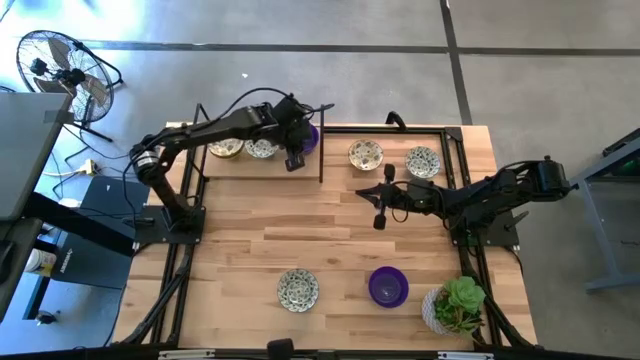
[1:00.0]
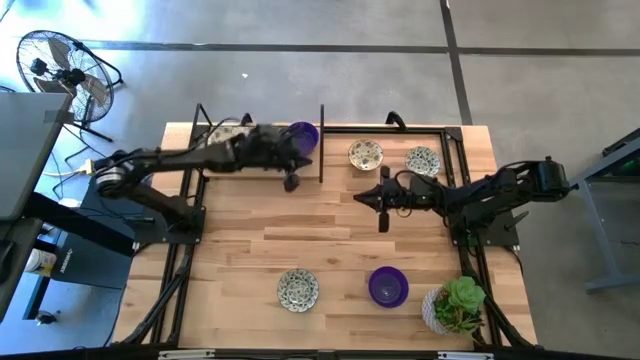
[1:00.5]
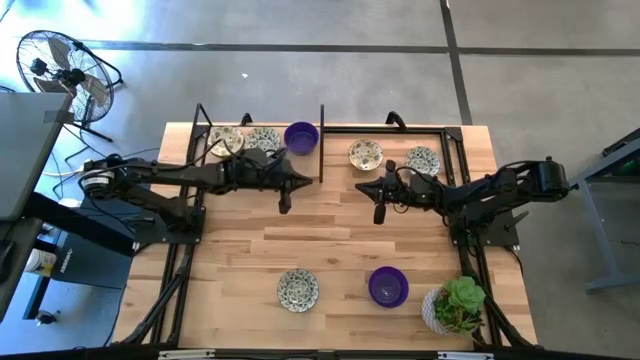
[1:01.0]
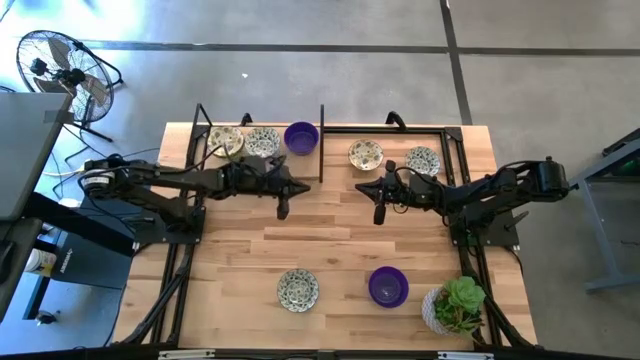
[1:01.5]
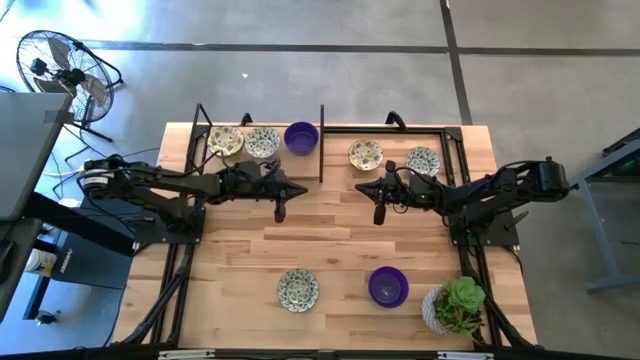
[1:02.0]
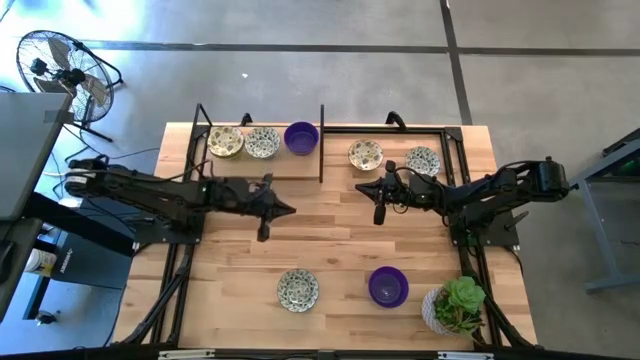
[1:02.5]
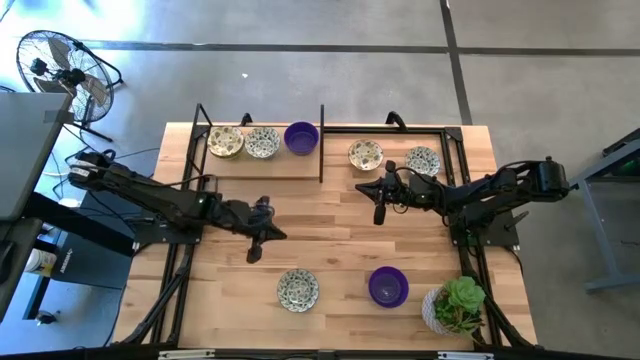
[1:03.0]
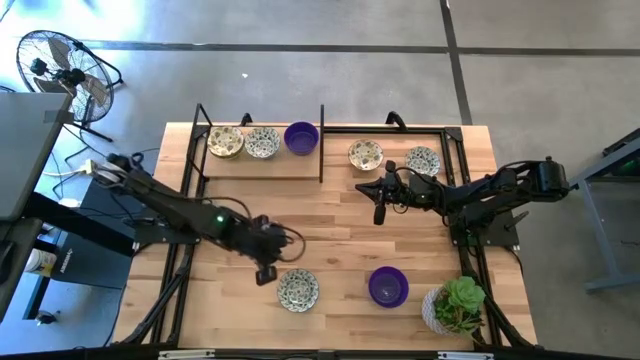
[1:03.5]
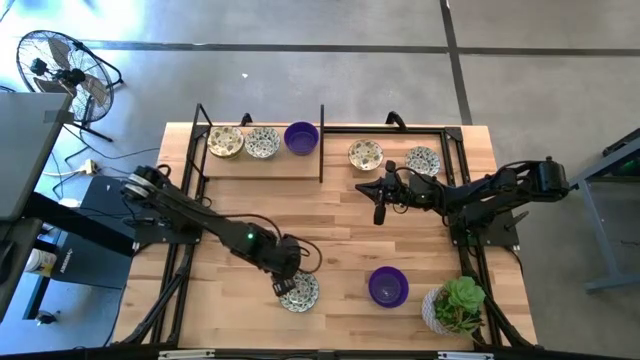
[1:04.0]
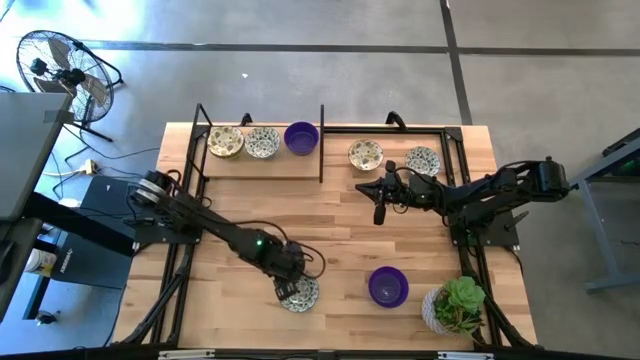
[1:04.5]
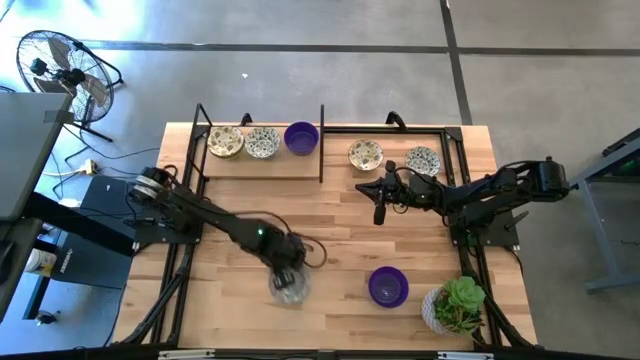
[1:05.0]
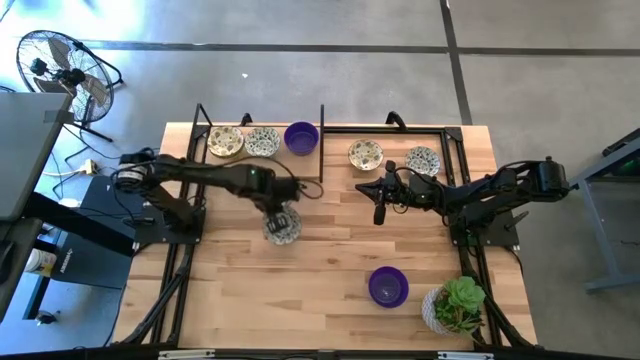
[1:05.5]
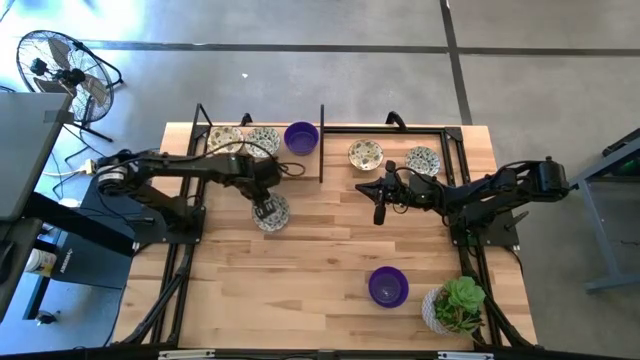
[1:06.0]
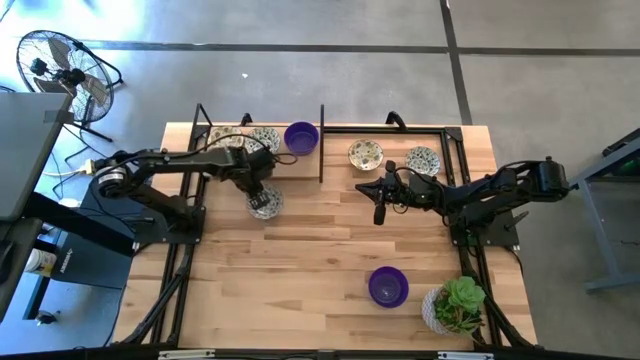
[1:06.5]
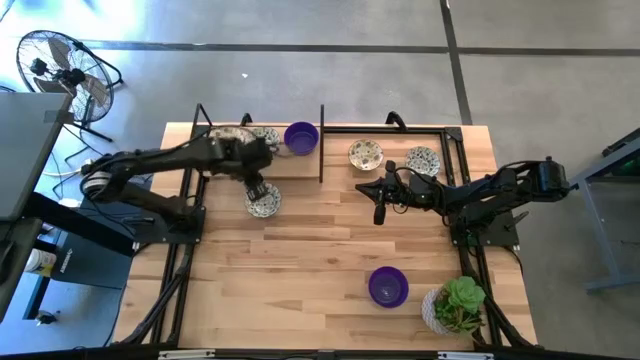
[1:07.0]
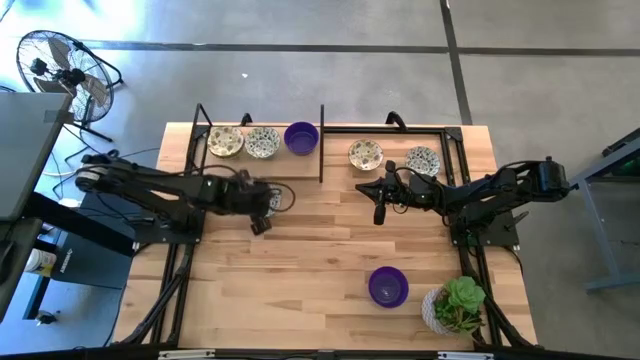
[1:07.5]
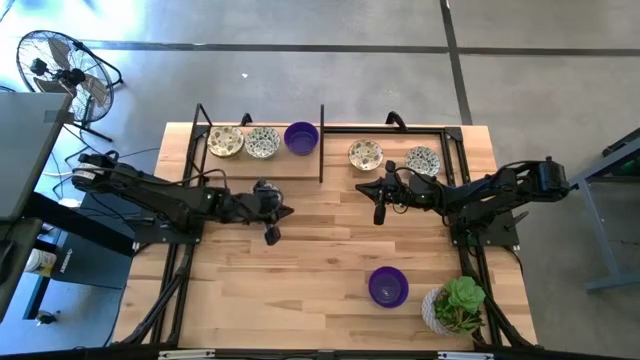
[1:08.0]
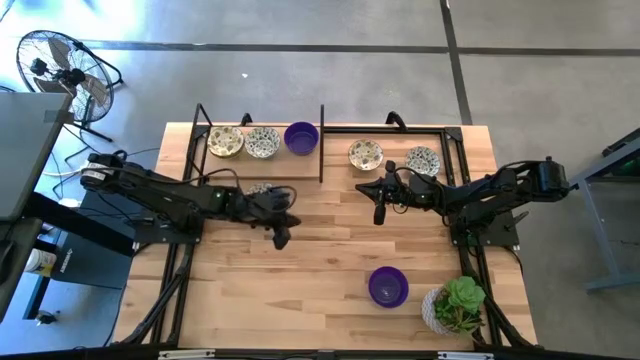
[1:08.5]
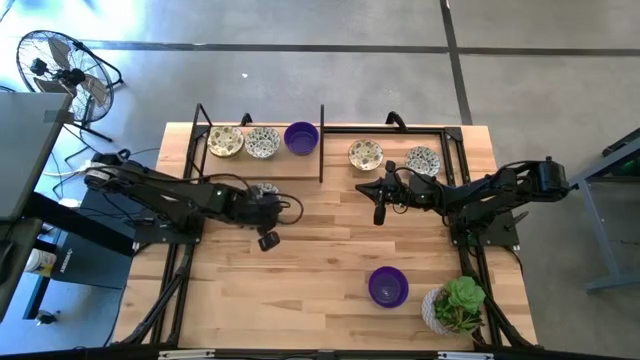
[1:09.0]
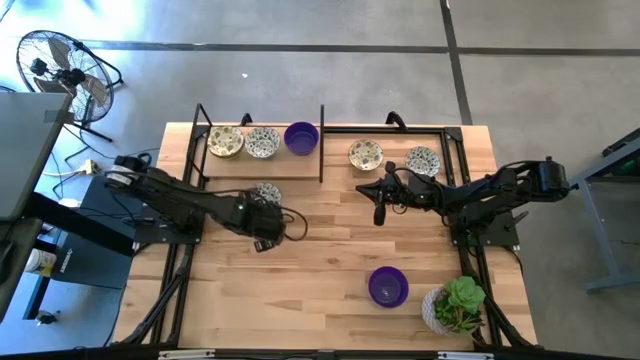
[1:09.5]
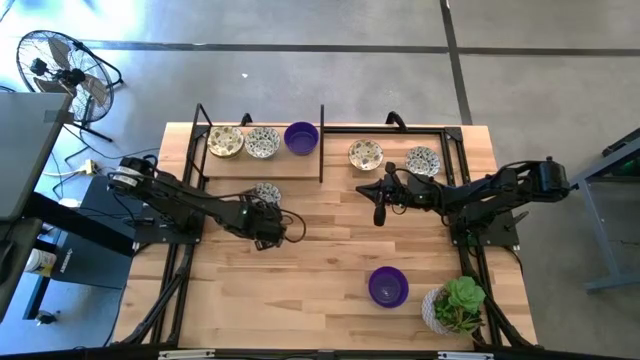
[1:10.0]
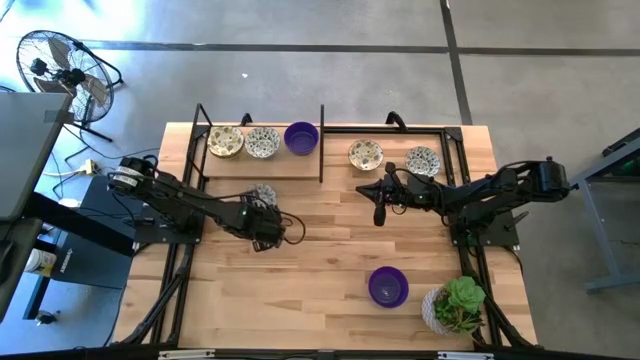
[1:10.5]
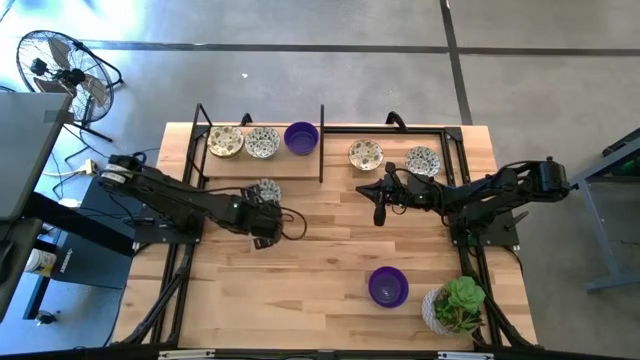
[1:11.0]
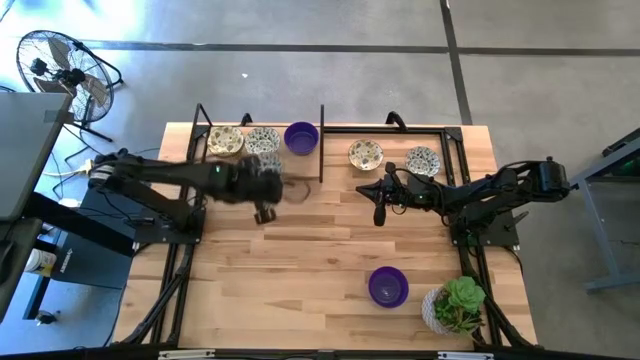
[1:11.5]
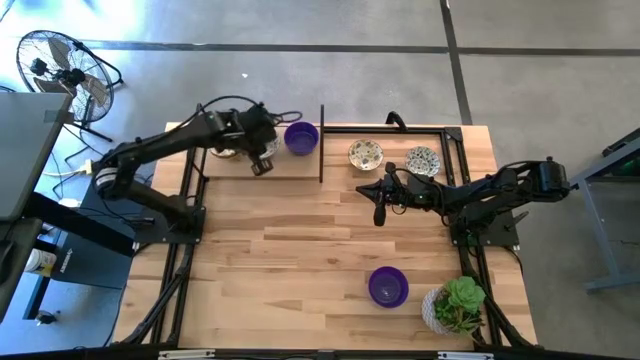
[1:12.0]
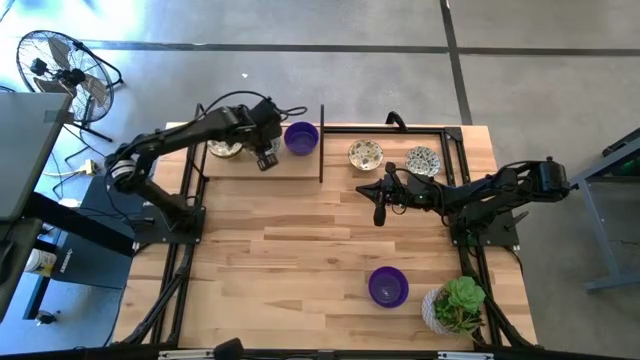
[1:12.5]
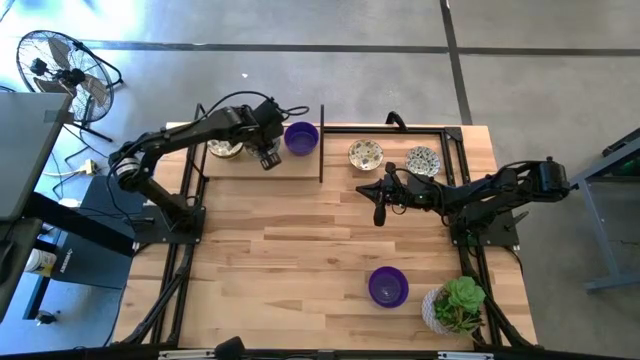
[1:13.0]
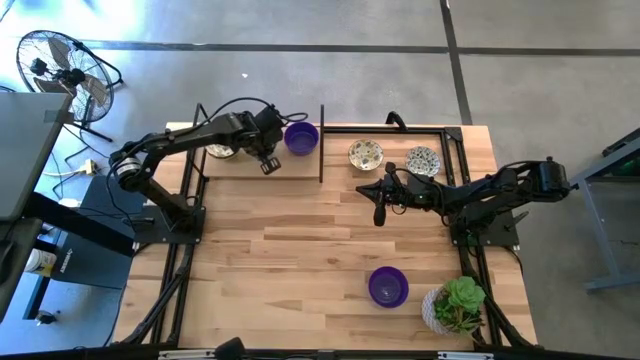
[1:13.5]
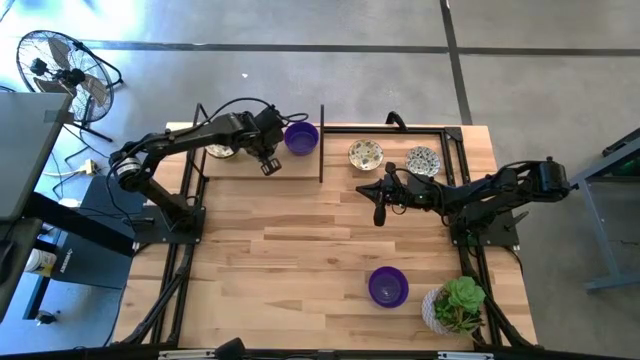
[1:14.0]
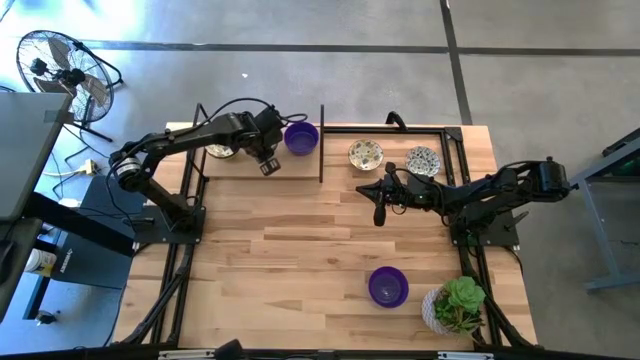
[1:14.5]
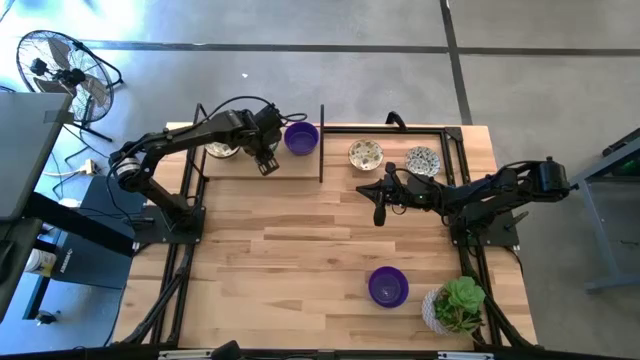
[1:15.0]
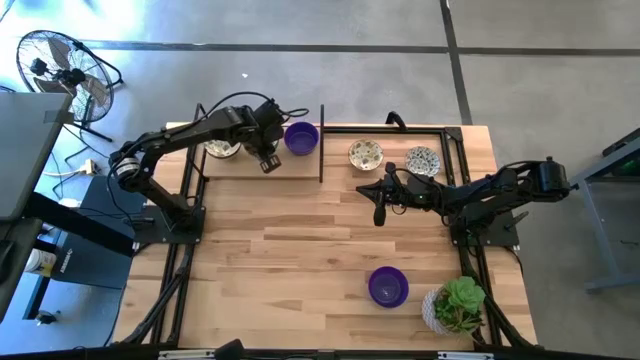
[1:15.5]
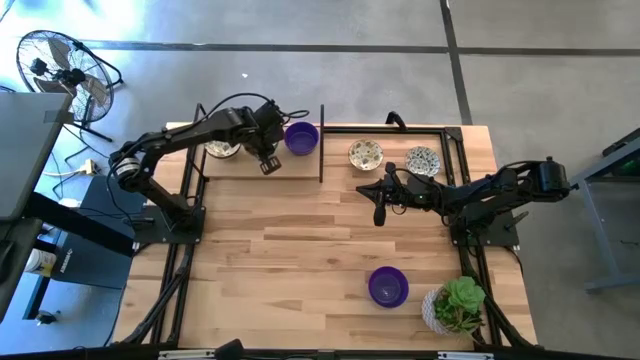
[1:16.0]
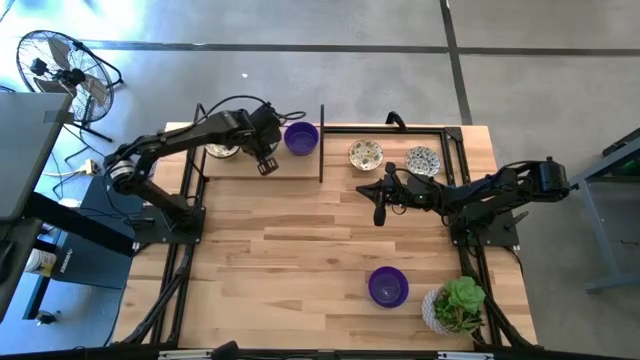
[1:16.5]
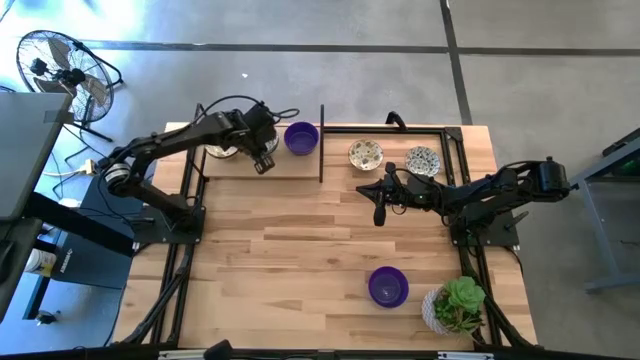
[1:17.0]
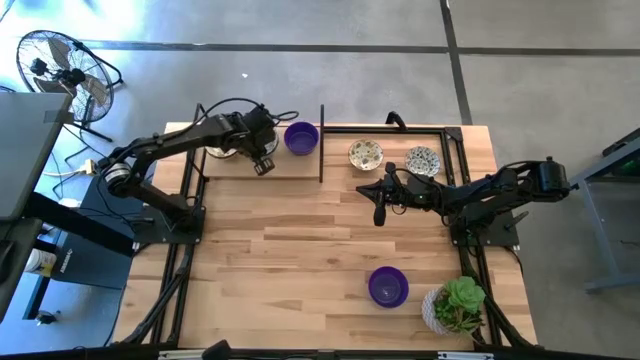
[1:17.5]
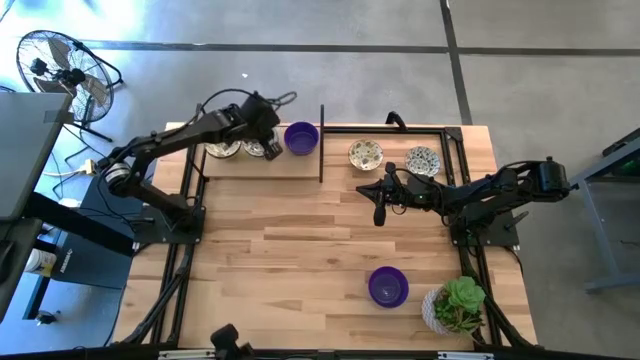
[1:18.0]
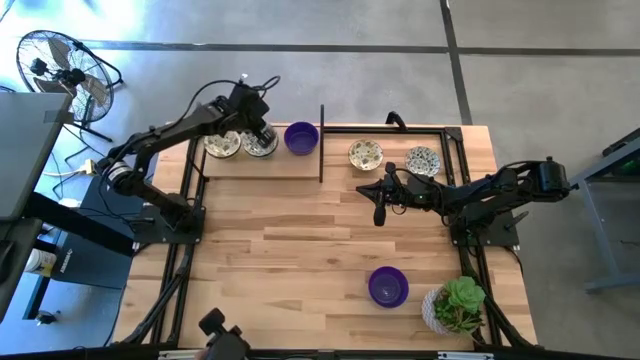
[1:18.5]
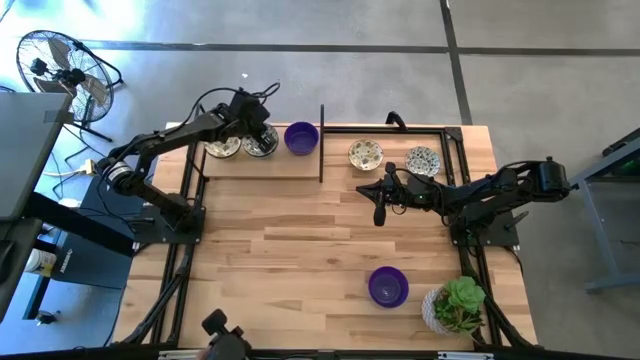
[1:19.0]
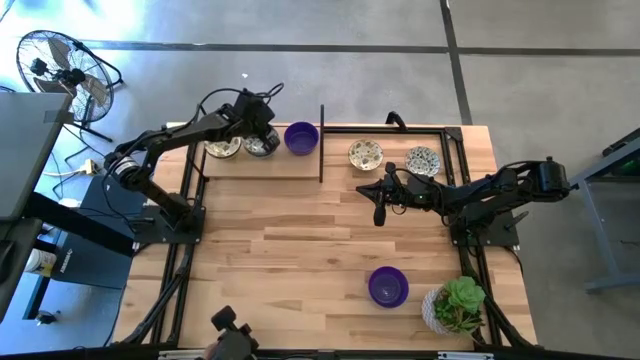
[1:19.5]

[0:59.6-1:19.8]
Task: Pick & Place Mini bowls
Stack the bottom light blue bowl on top of the other light blue bowl on the shelf
